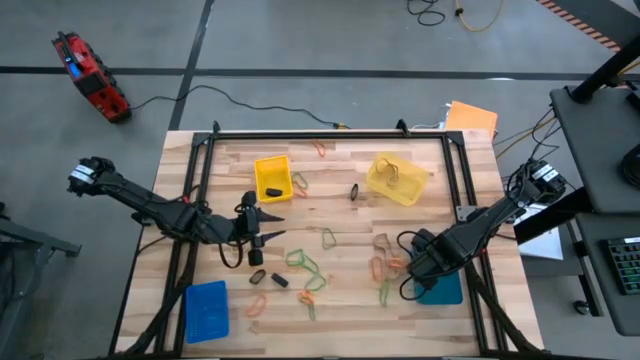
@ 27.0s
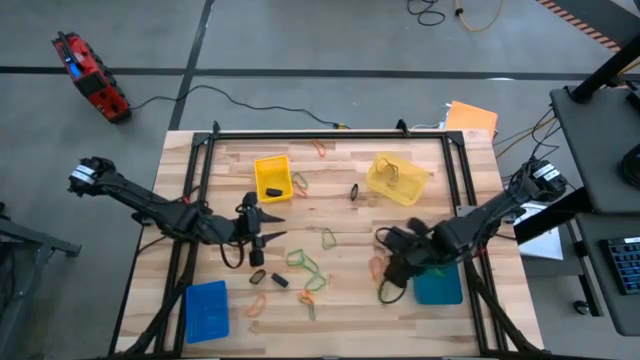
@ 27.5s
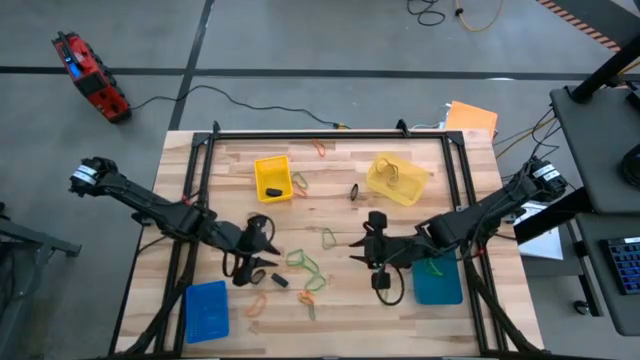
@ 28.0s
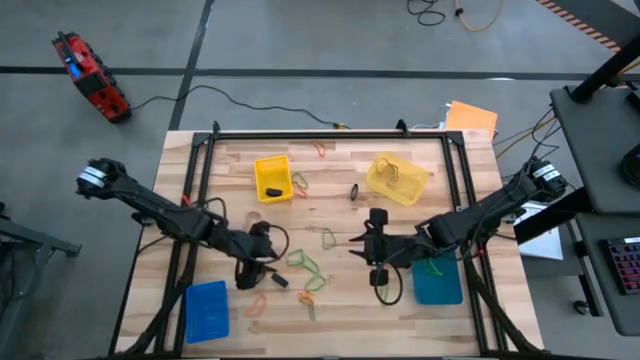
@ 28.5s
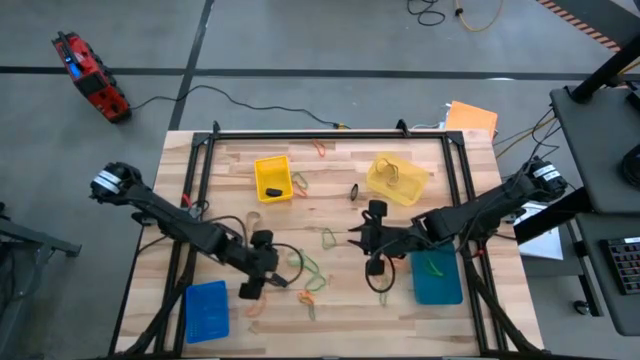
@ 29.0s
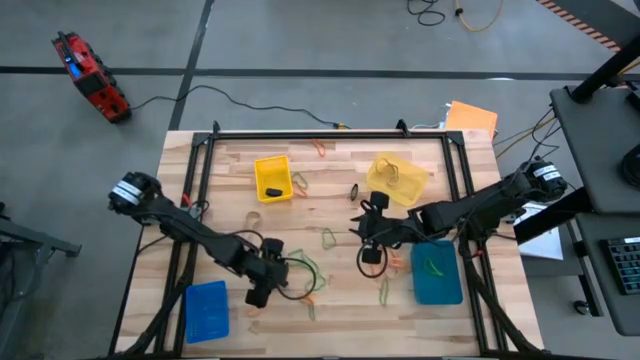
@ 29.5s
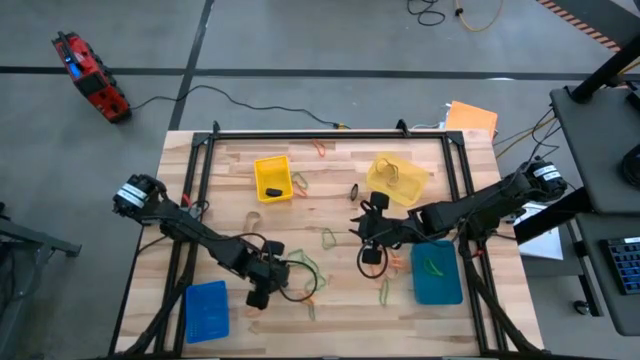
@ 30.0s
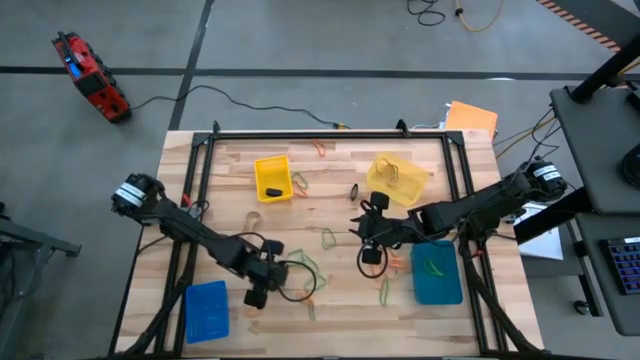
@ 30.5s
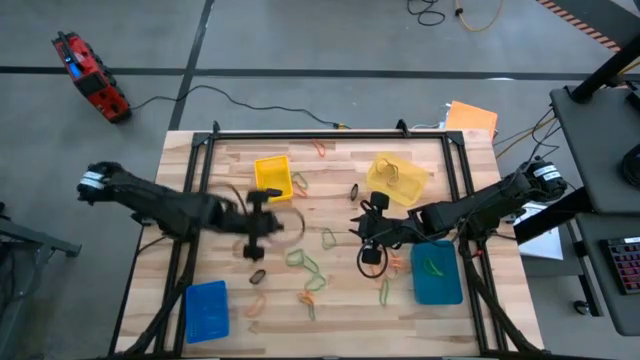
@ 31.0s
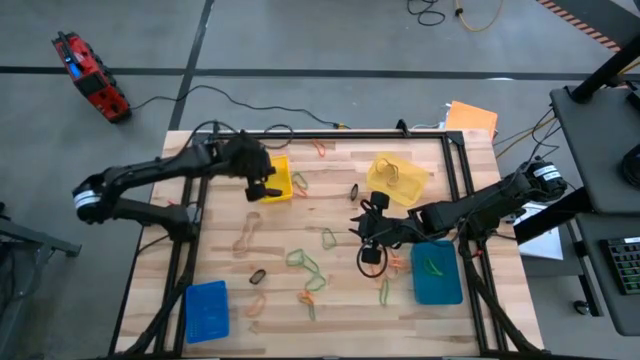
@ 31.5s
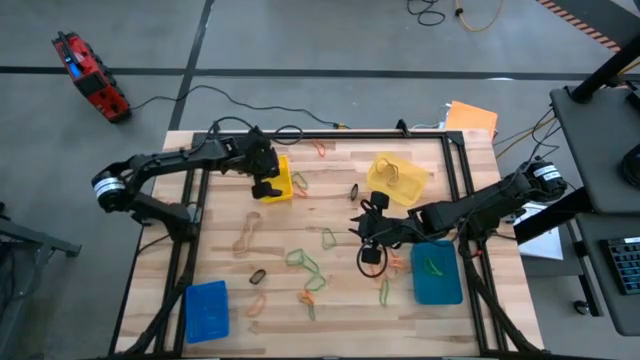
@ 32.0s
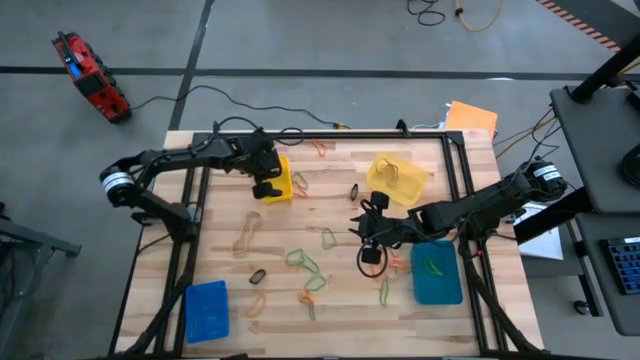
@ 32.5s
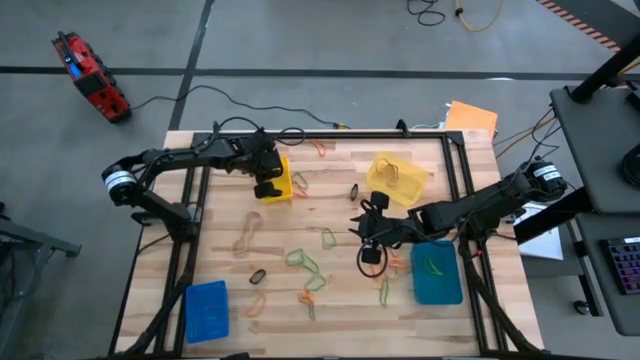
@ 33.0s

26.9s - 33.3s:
Task: Sort rubber bands into baskets
Put the black rubber band into the left yellow bin

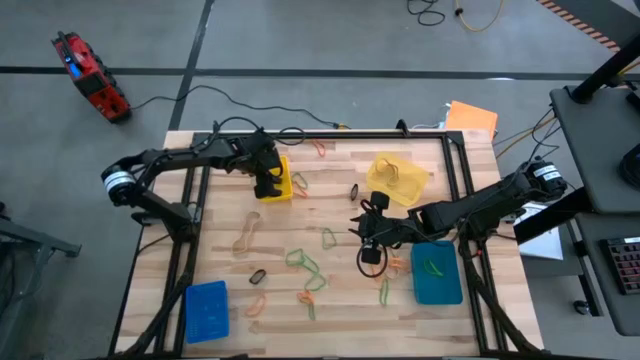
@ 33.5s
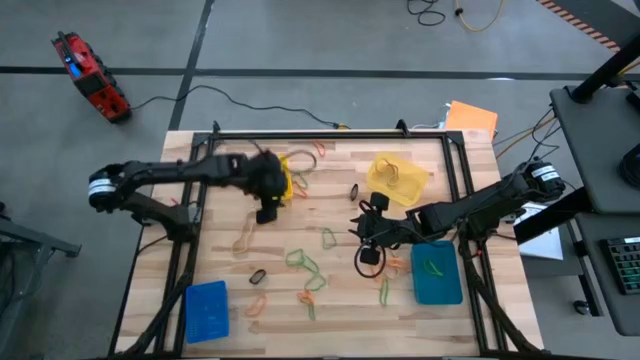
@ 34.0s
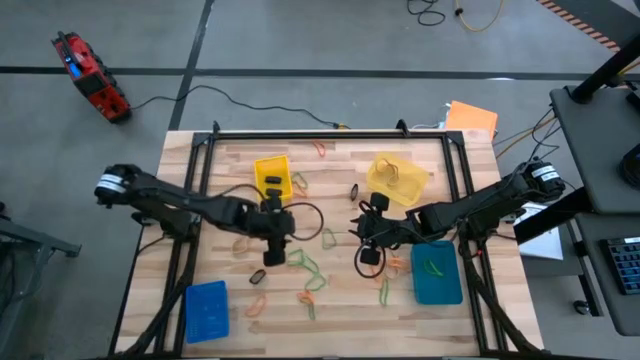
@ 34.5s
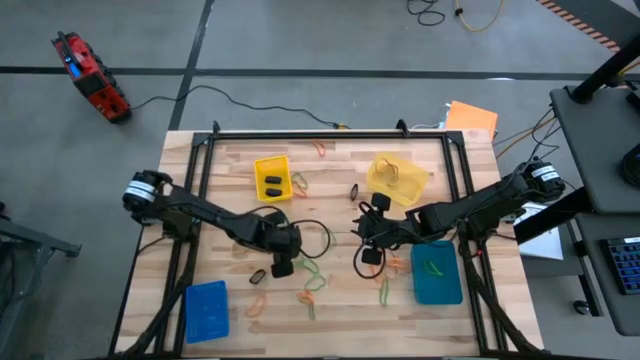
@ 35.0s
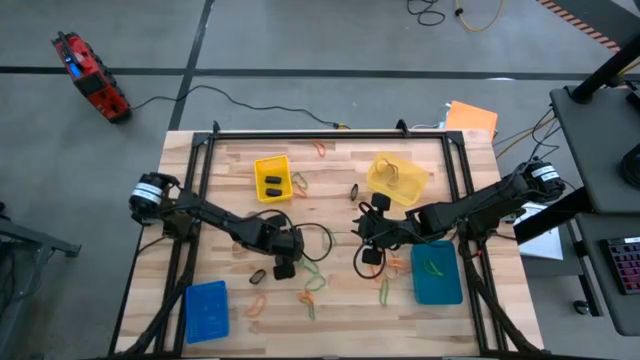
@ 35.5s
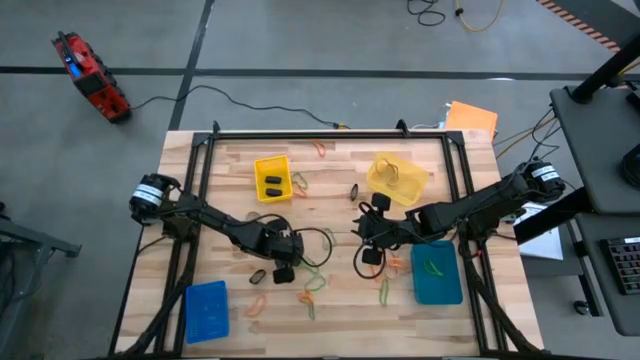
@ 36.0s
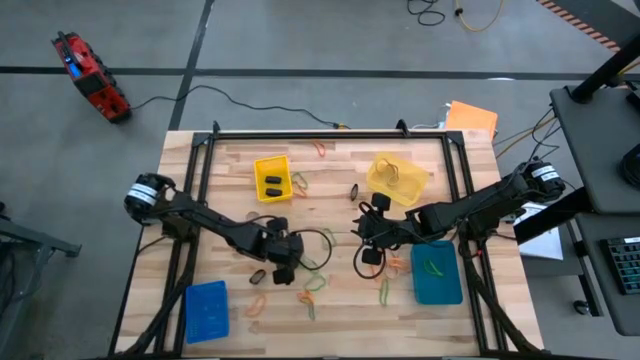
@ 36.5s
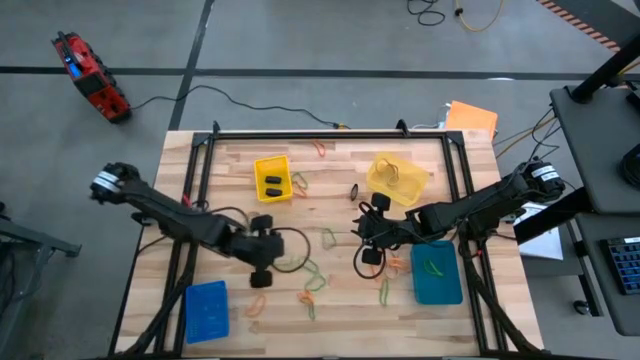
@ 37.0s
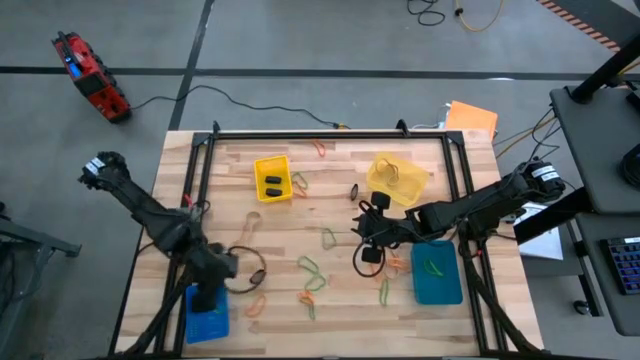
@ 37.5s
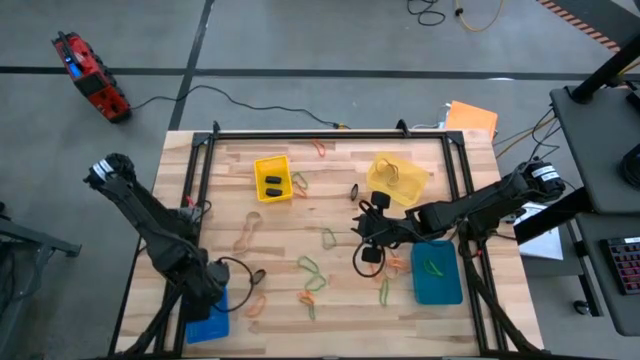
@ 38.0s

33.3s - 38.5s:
Put the green rubber band into the left blue bin

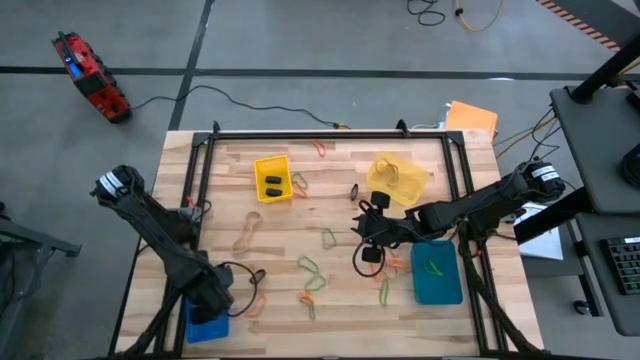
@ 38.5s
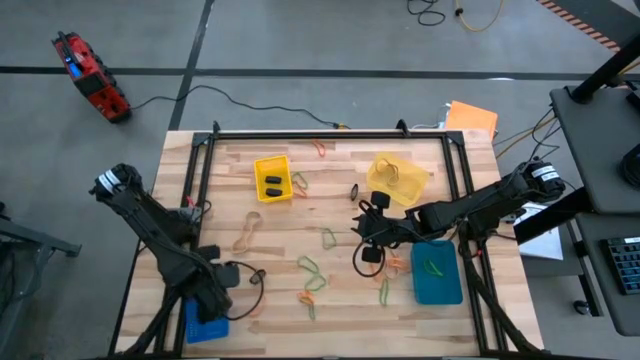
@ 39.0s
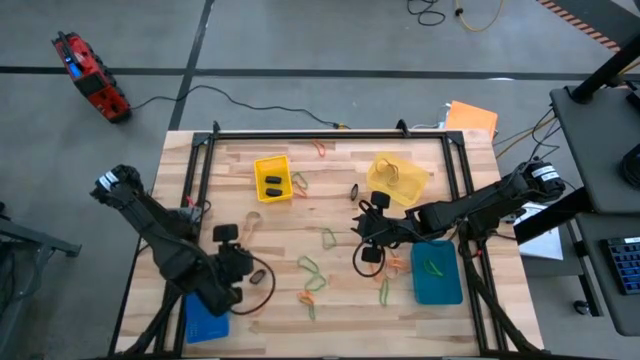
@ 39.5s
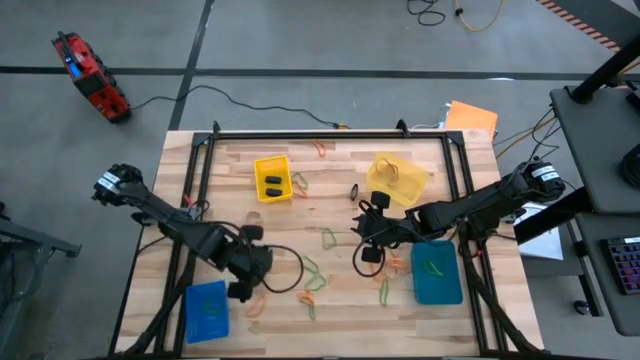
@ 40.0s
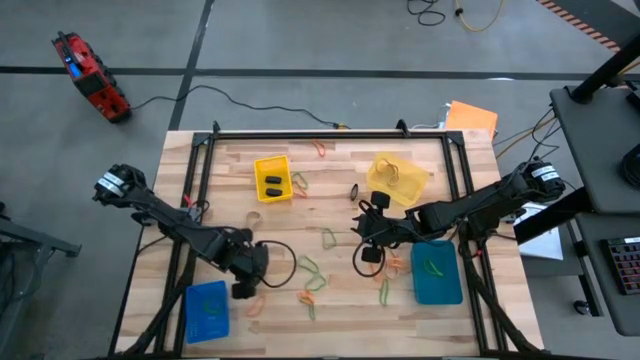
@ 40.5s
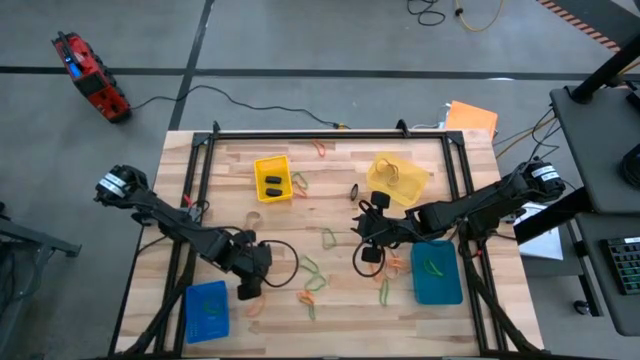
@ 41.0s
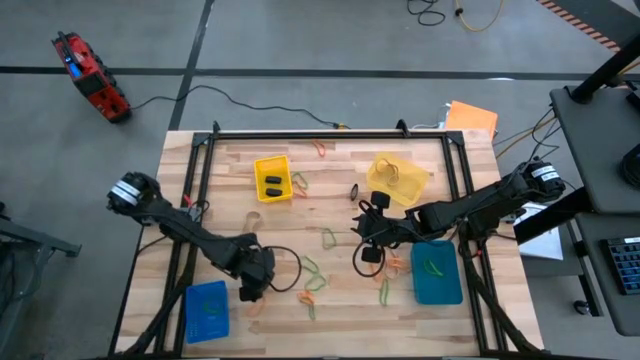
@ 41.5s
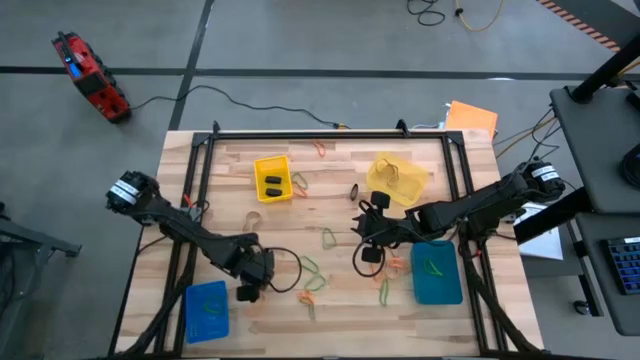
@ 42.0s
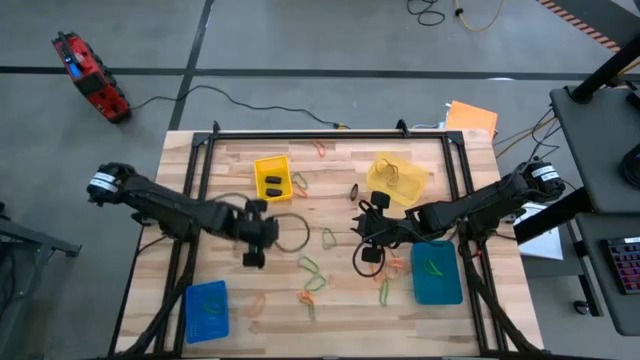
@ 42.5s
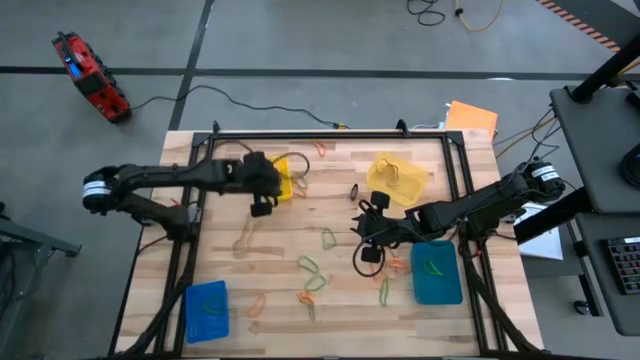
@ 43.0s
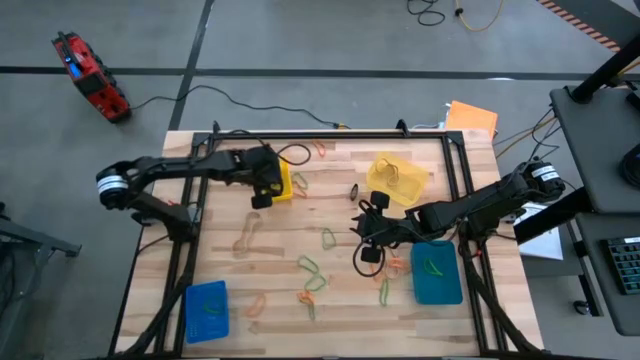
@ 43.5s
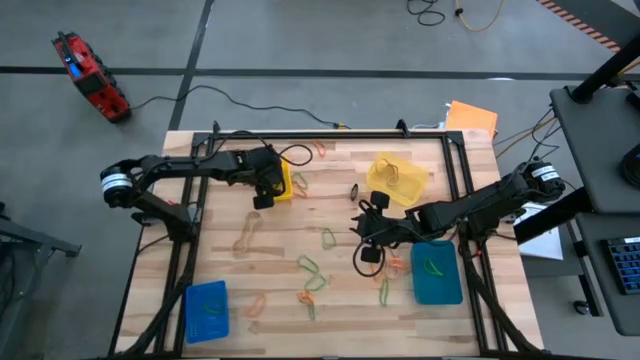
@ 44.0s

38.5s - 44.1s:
Put the black rubber band into the left yellow bin

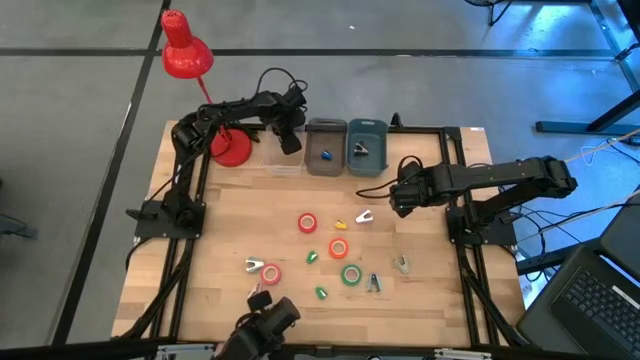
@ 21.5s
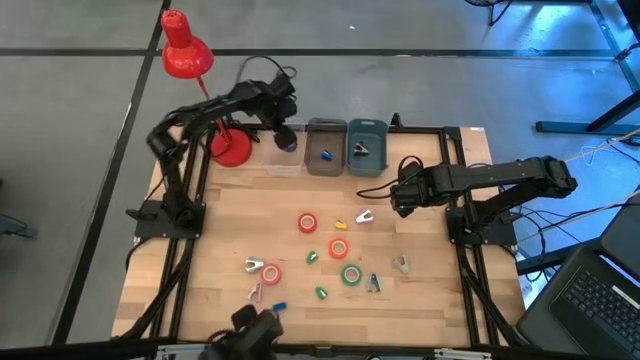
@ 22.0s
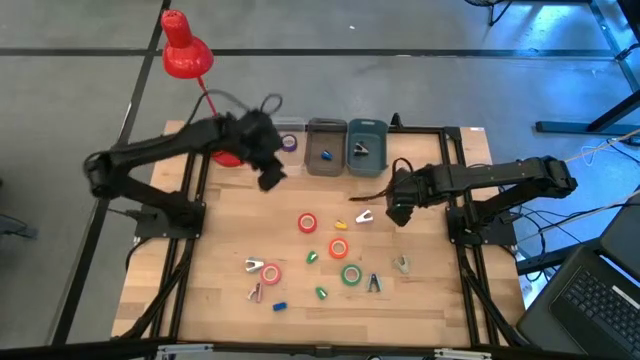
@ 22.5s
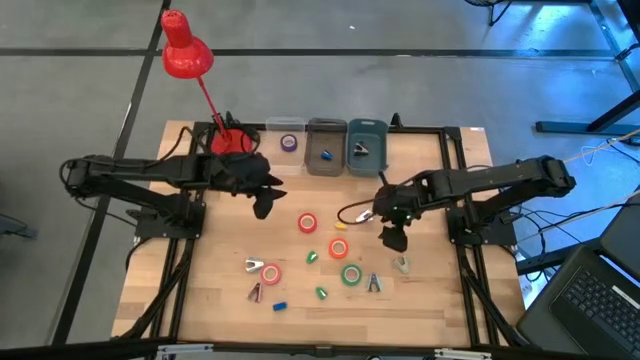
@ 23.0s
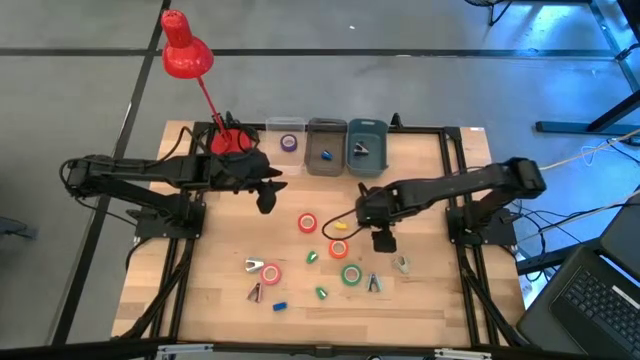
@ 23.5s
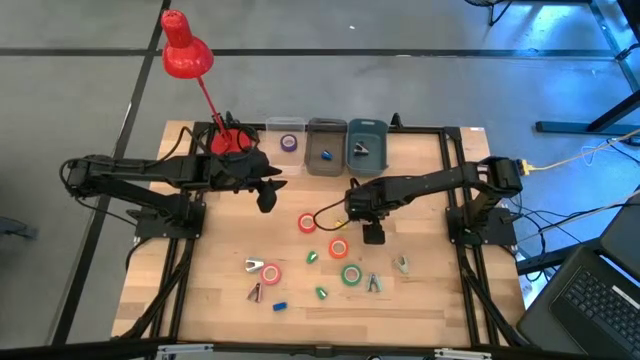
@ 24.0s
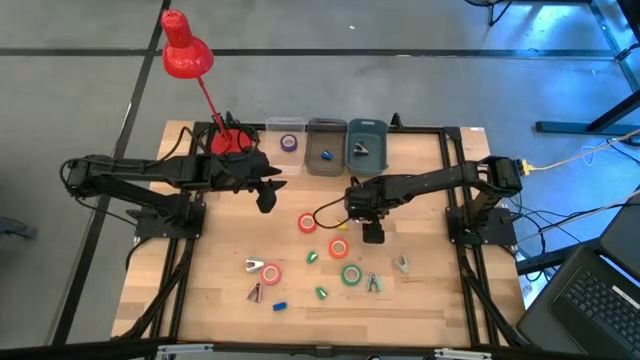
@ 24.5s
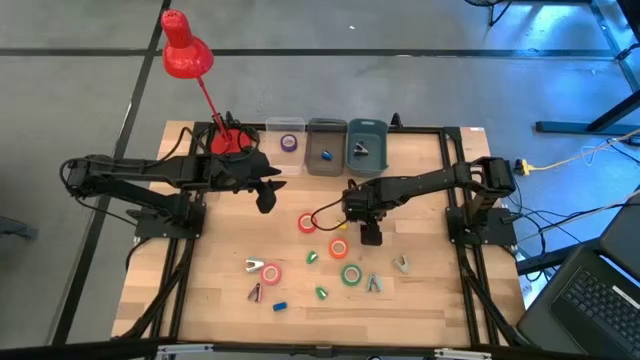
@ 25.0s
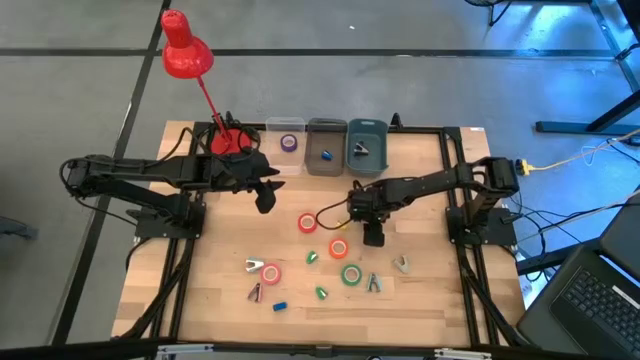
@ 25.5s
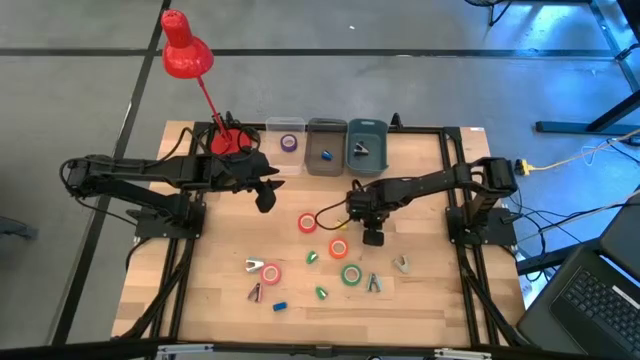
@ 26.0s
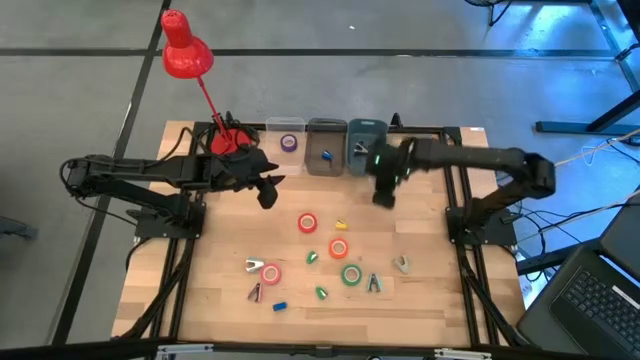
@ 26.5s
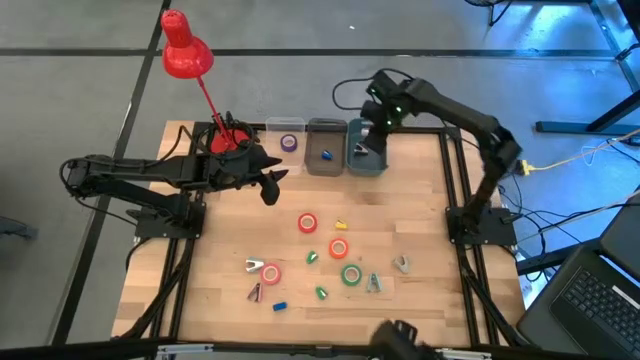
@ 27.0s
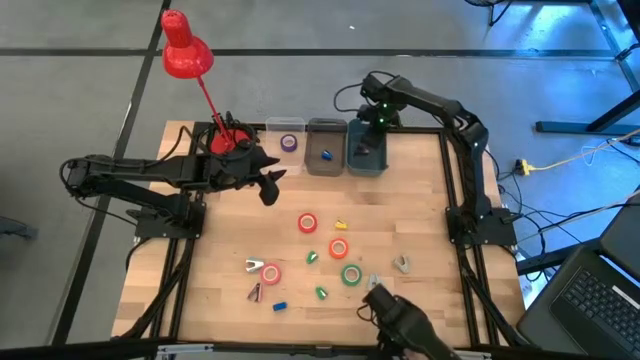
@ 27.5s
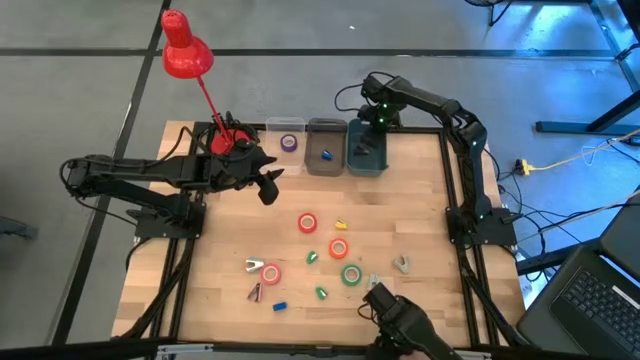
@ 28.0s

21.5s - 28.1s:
Task: Pick and place Stapler, Stapler remover, tape
Put the purple staple remover into the blue bin
